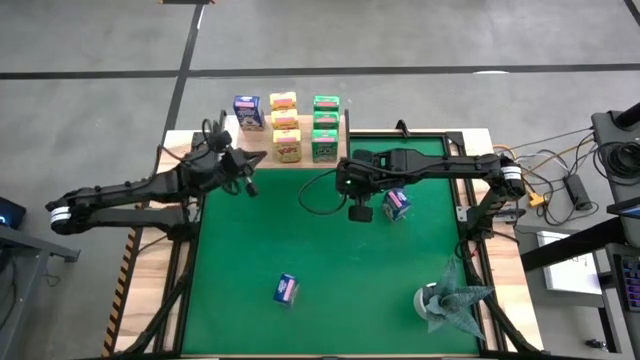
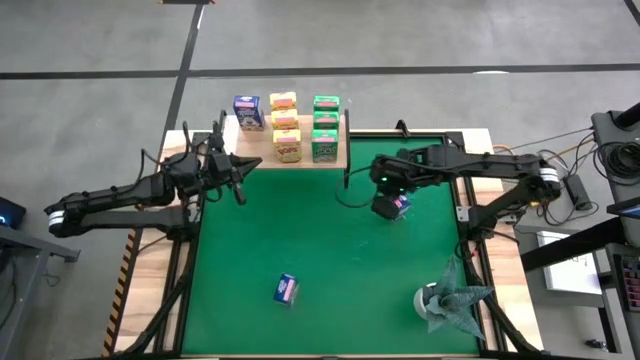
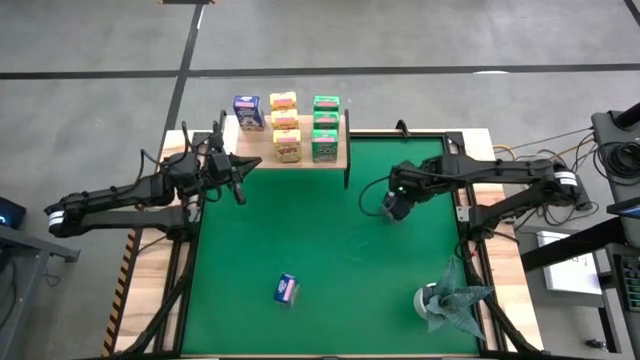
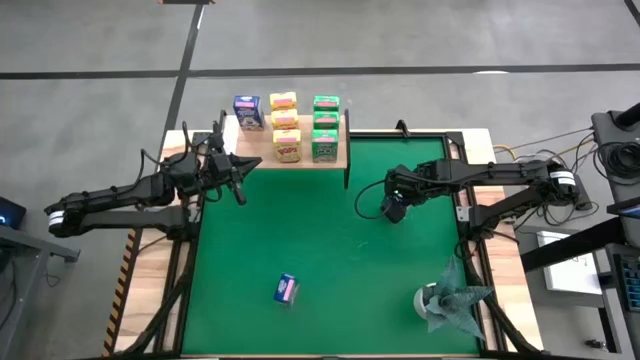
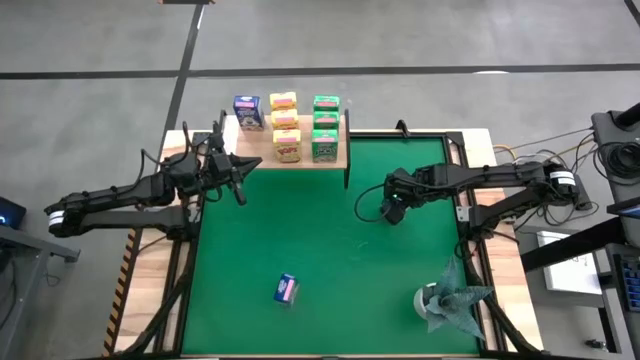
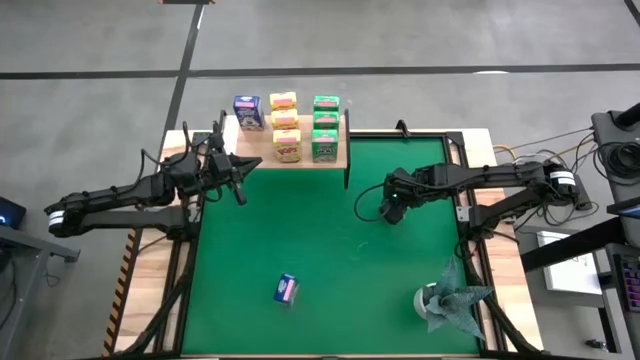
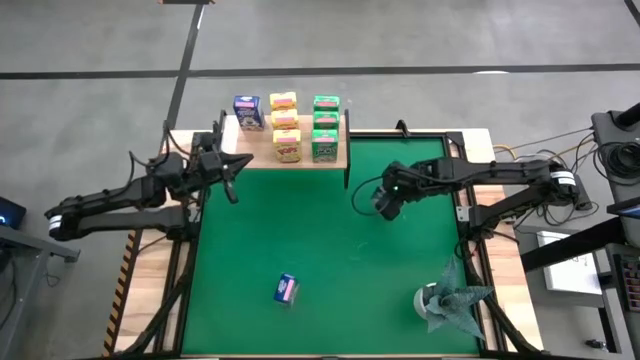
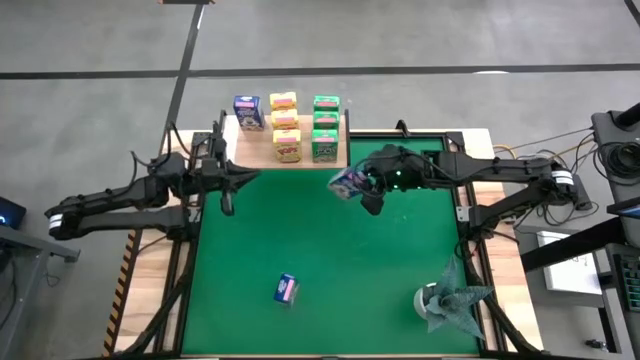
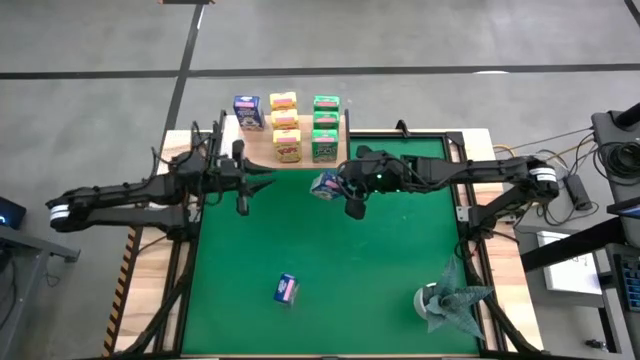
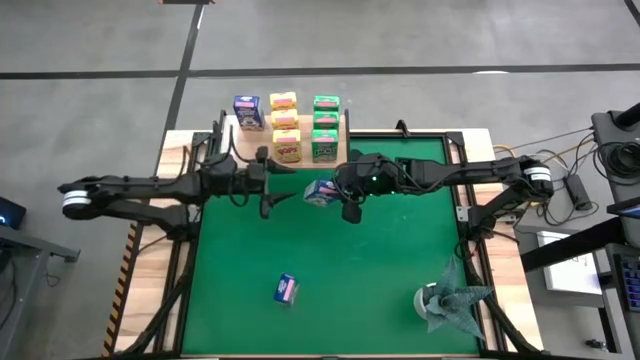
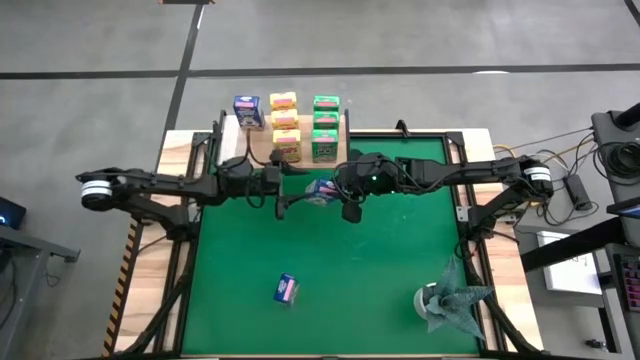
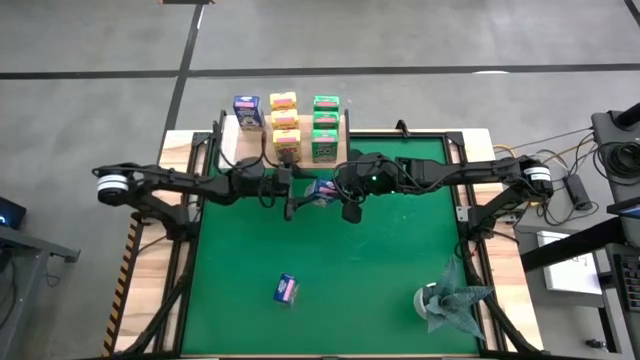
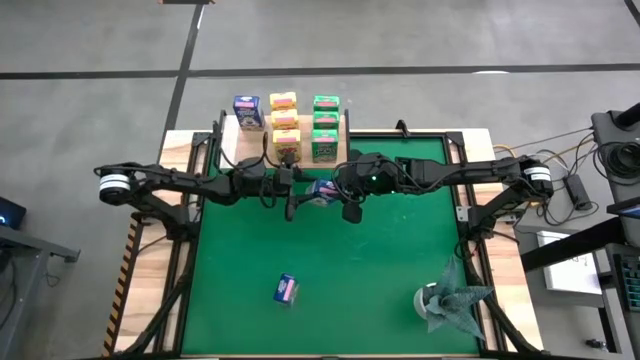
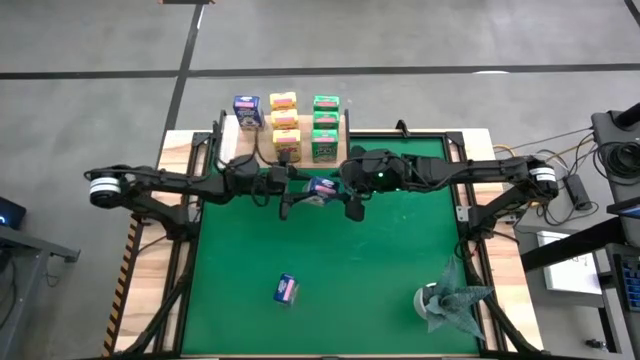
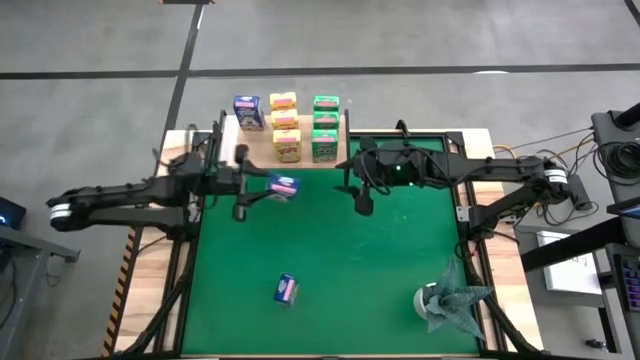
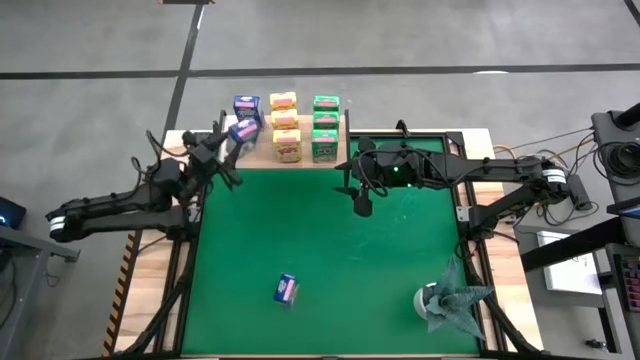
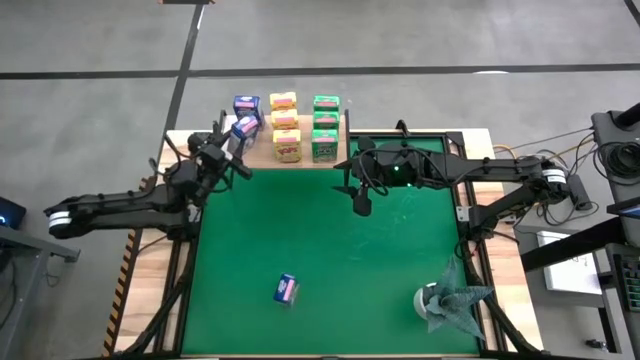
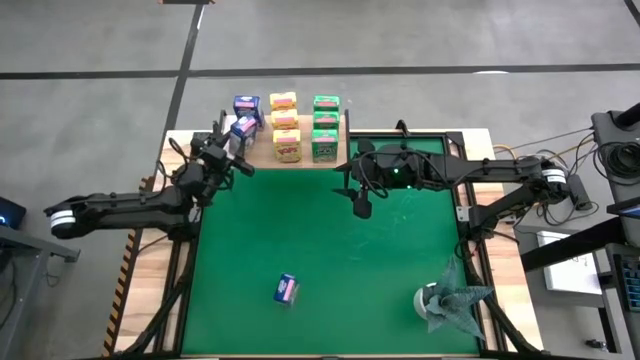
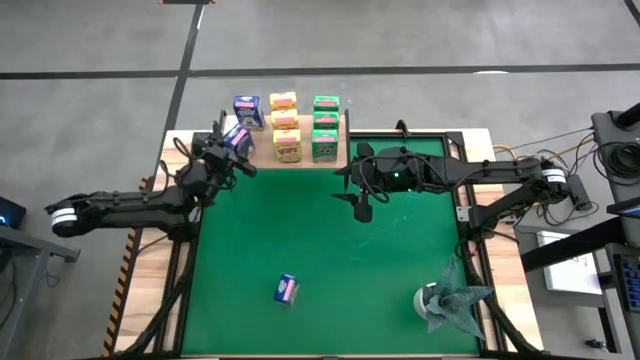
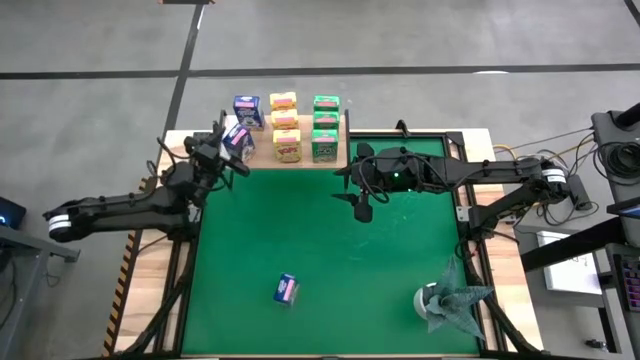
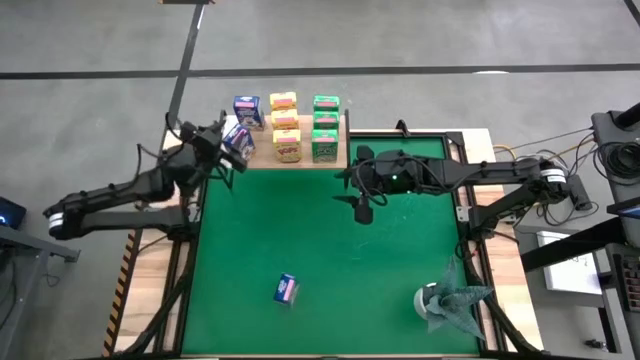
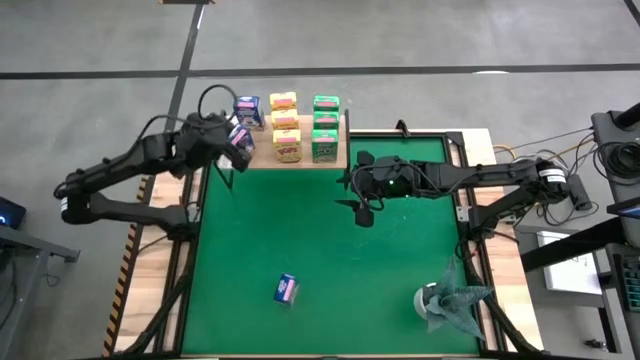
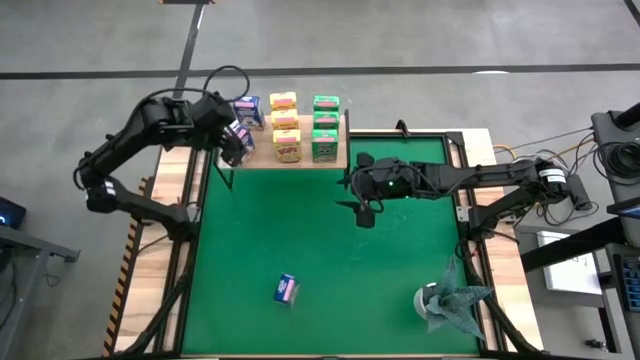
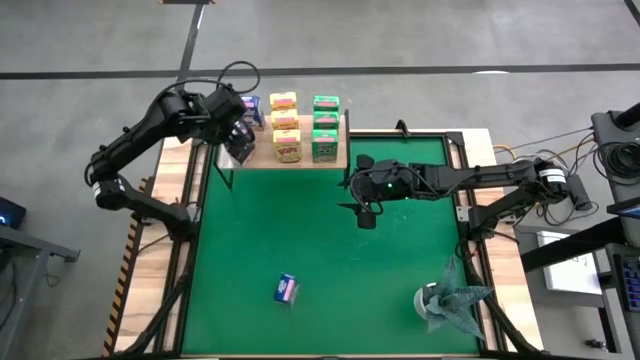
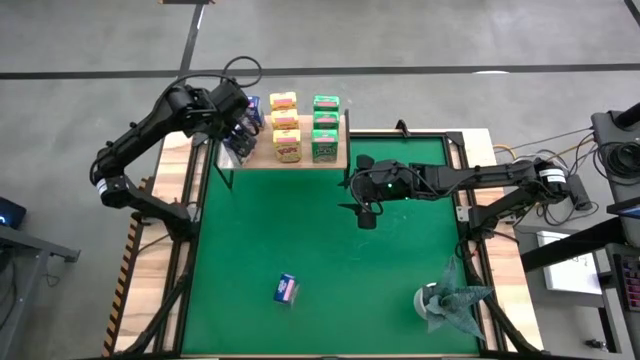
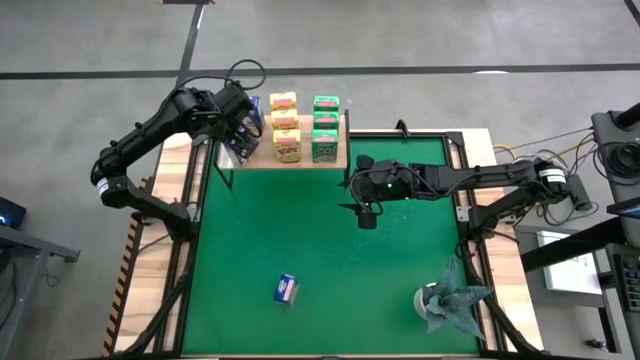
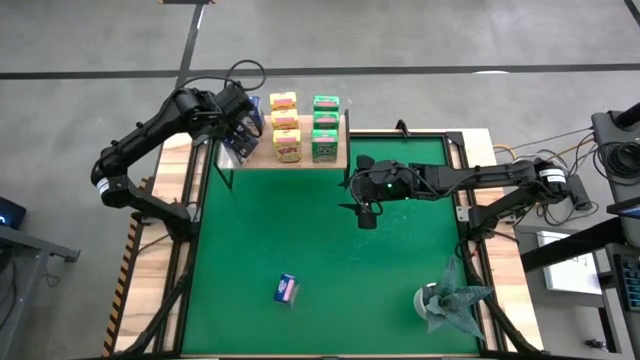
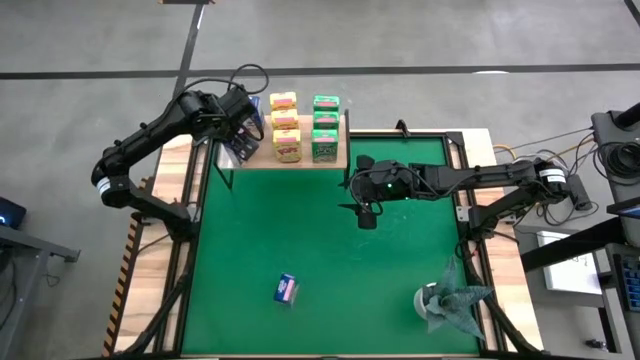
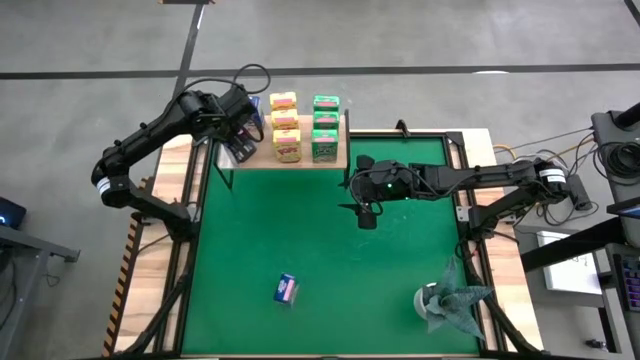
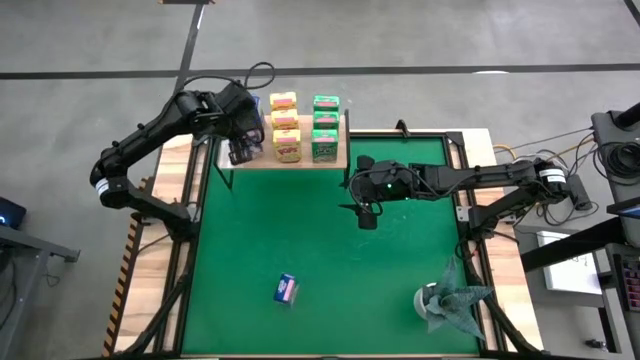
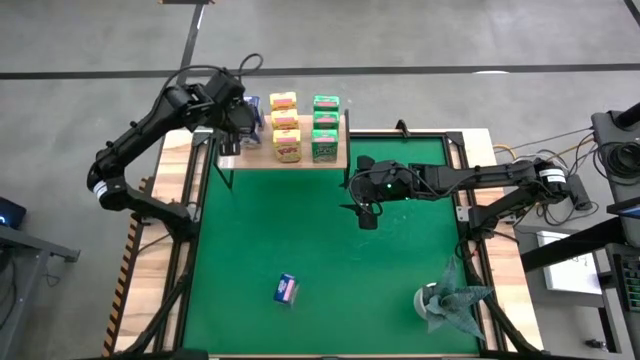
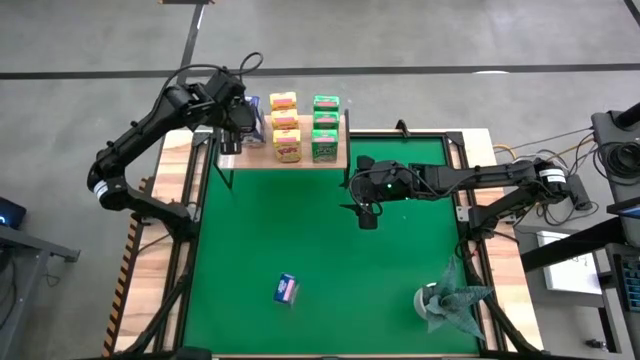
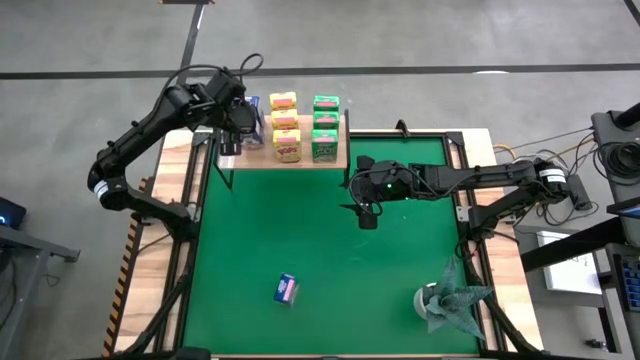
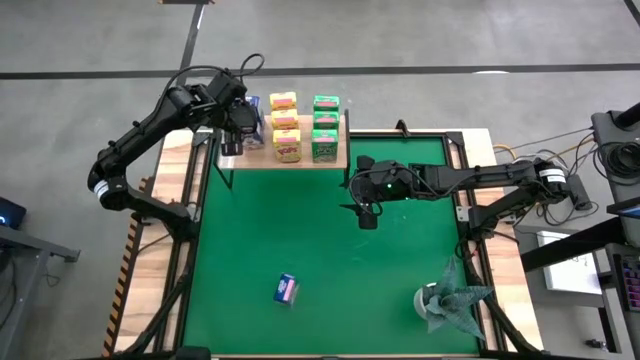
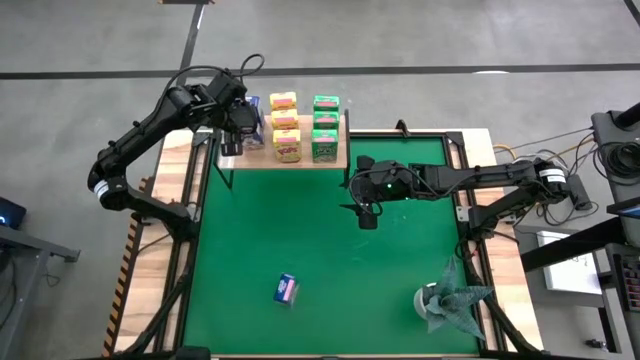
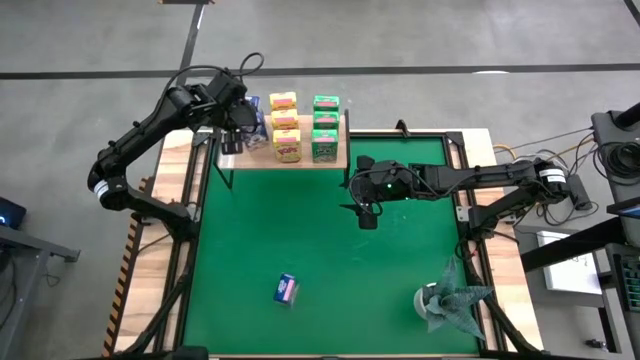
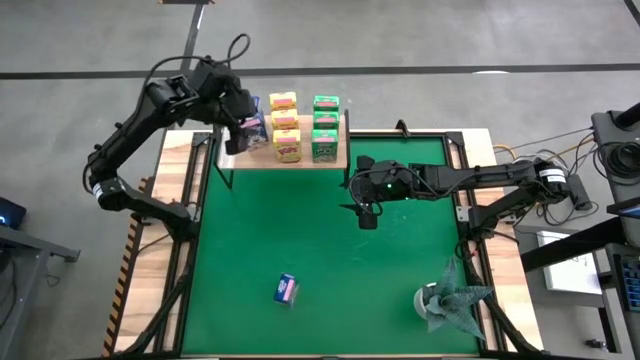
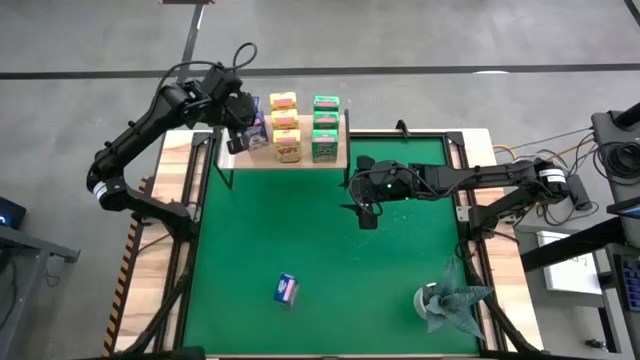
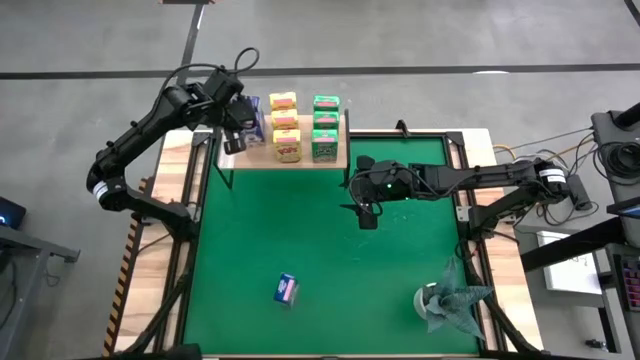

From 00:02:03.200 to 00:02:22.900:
Task: Stack cereal on shelf
Put the top blue cereal box on the shelf aligned with the other blue cereal box

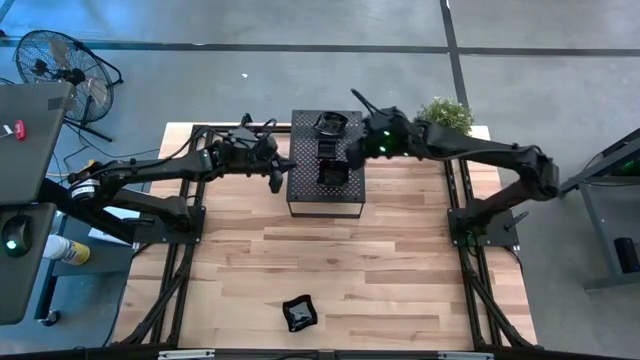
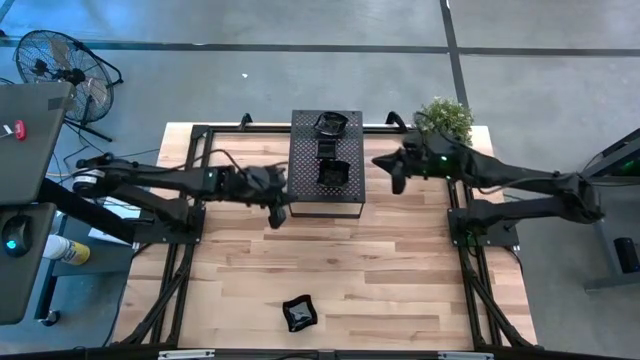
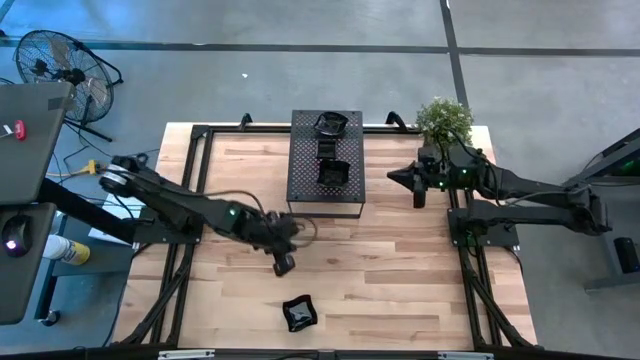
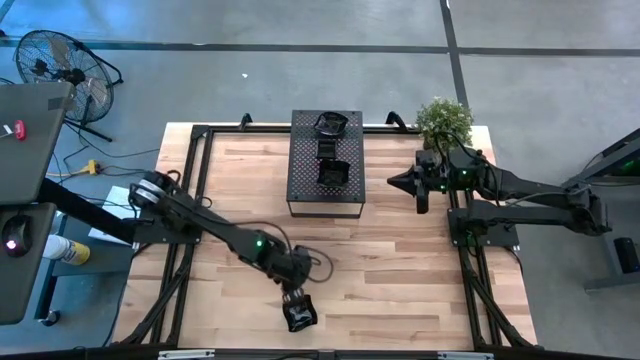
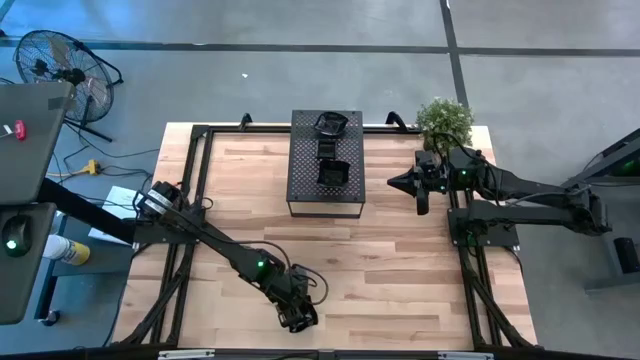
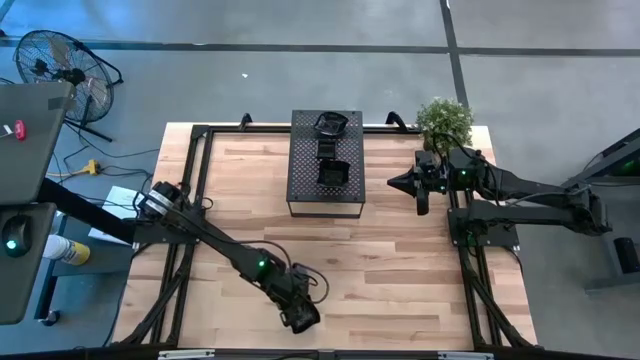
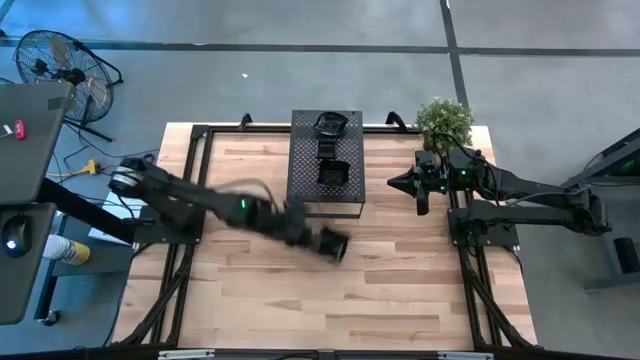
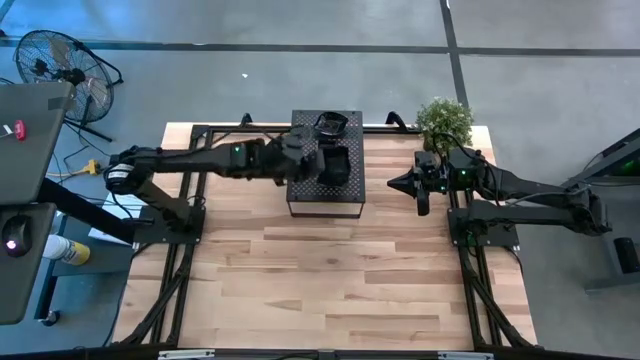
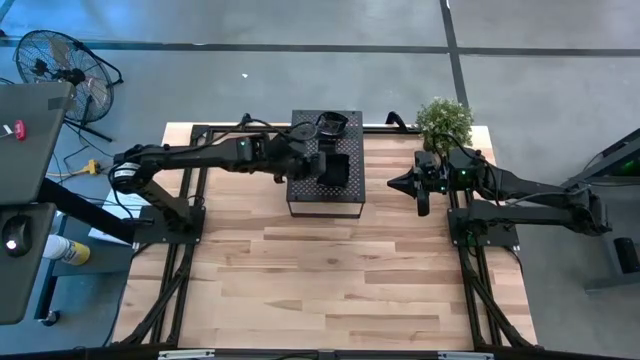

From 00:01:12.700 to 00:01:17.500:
Task: Pick & Place Mini shaped plates
Stack the distorted square plate on top of the stacked distorted square plates on the shelf
